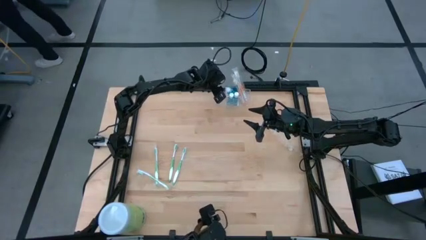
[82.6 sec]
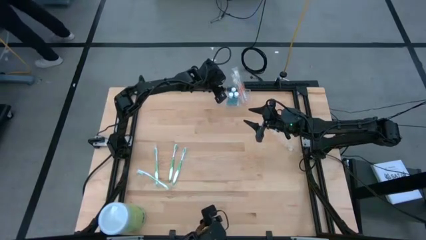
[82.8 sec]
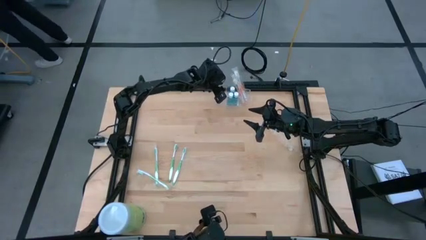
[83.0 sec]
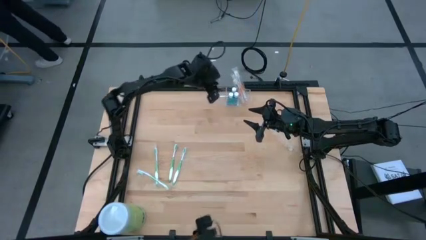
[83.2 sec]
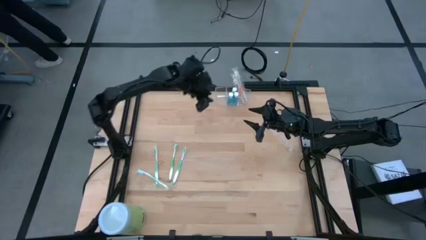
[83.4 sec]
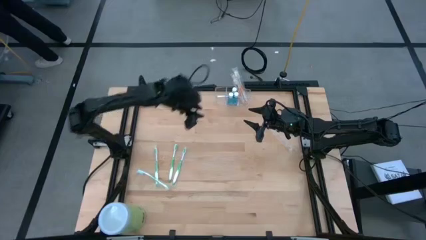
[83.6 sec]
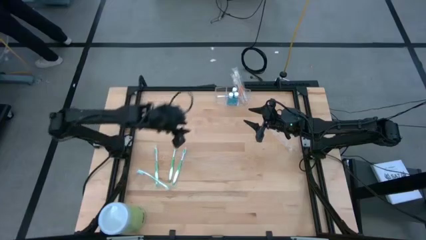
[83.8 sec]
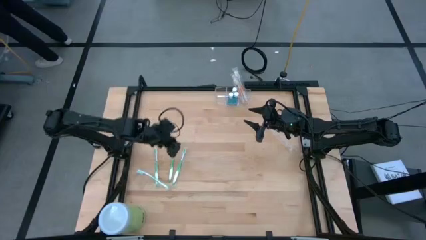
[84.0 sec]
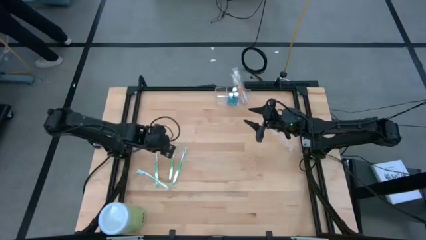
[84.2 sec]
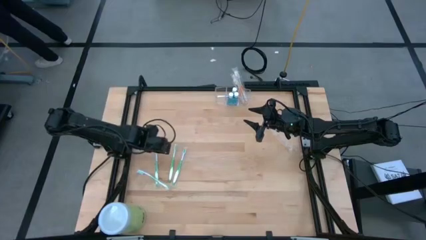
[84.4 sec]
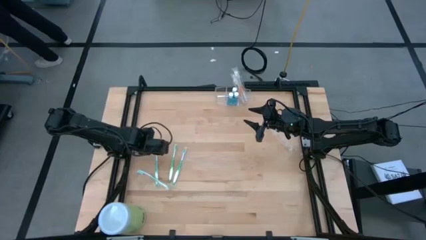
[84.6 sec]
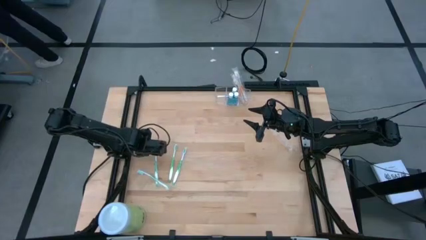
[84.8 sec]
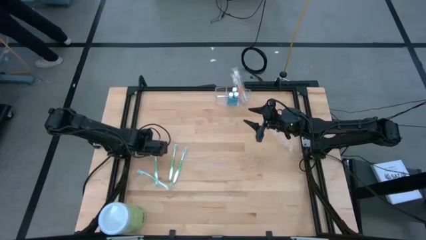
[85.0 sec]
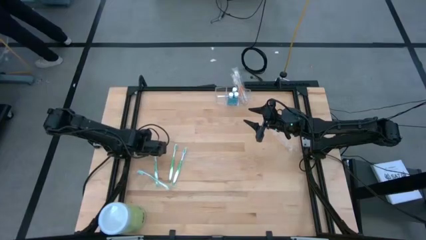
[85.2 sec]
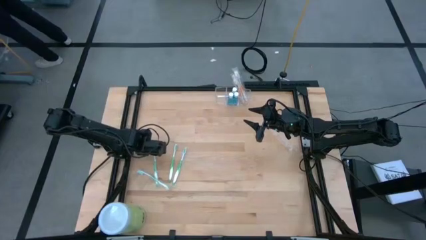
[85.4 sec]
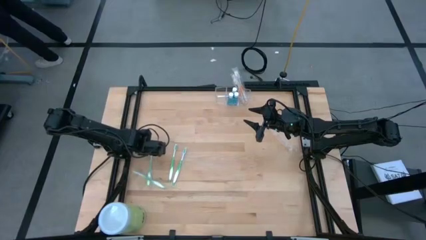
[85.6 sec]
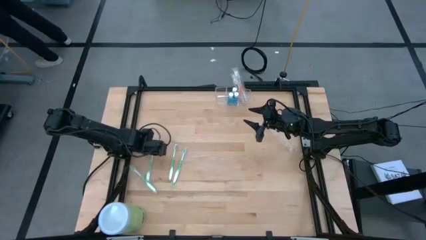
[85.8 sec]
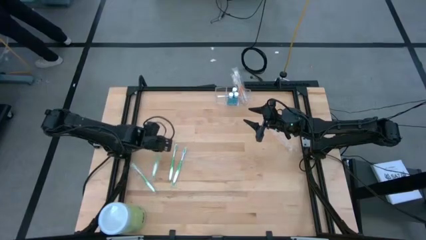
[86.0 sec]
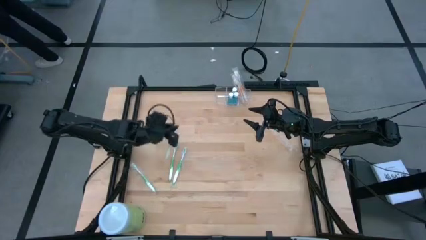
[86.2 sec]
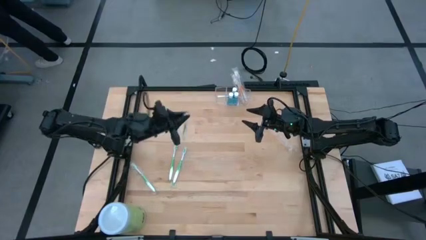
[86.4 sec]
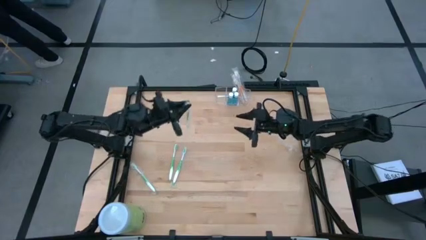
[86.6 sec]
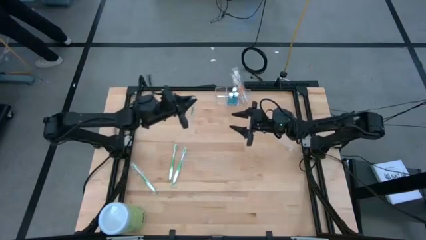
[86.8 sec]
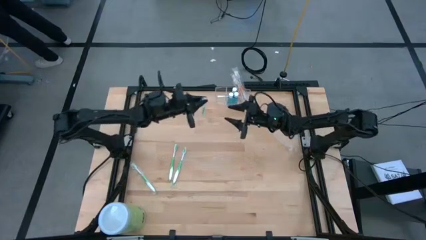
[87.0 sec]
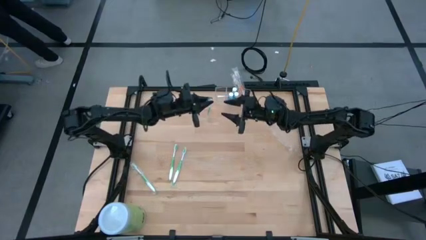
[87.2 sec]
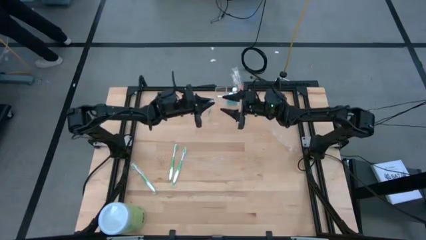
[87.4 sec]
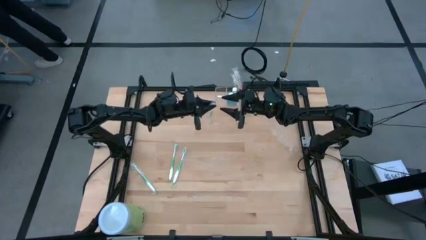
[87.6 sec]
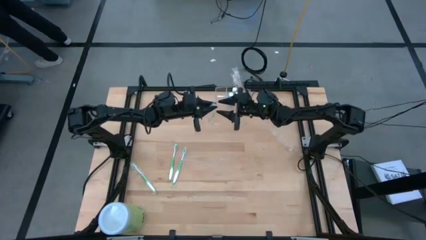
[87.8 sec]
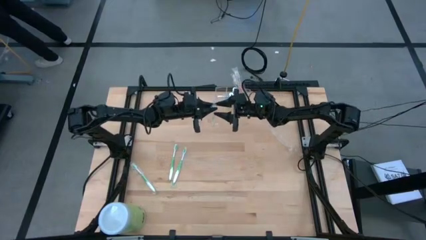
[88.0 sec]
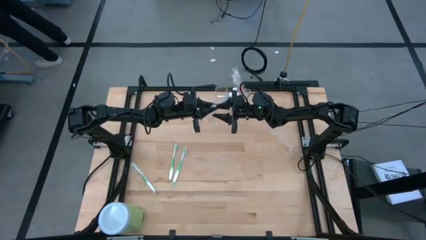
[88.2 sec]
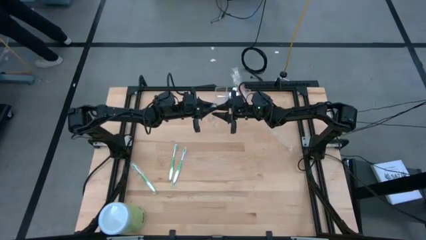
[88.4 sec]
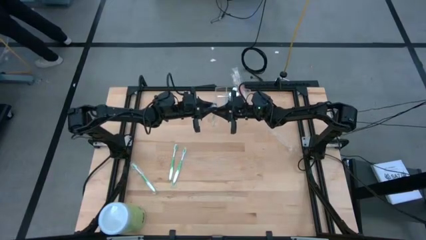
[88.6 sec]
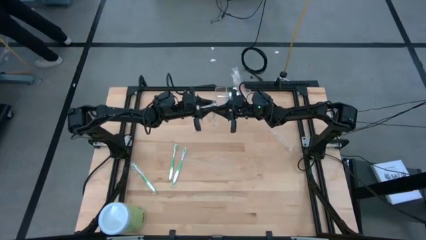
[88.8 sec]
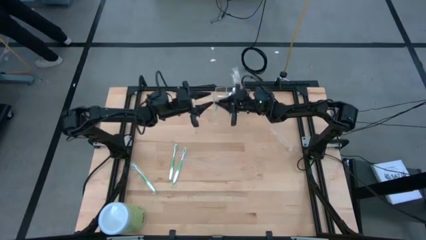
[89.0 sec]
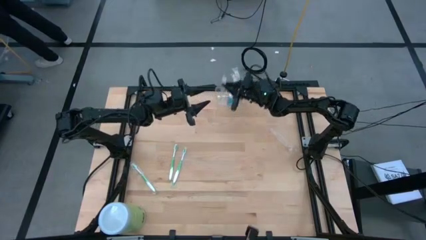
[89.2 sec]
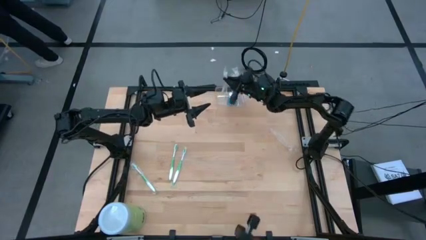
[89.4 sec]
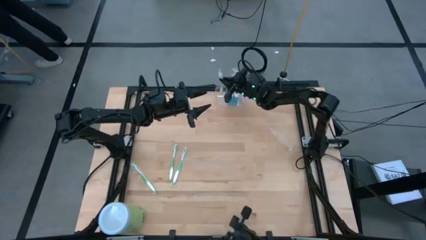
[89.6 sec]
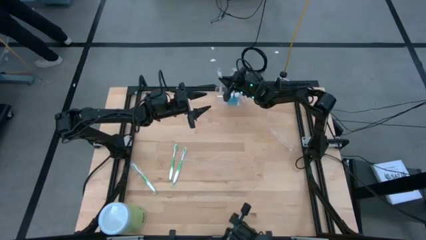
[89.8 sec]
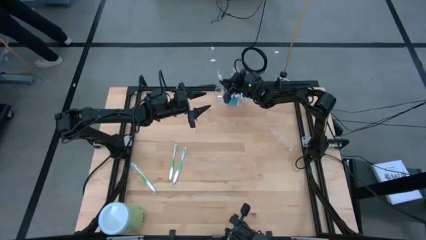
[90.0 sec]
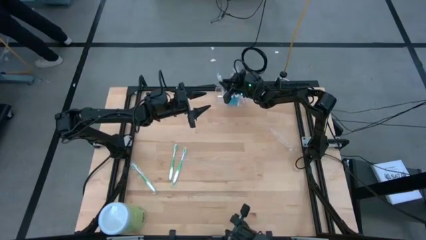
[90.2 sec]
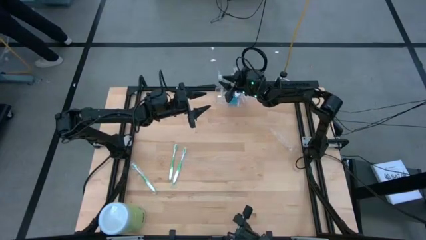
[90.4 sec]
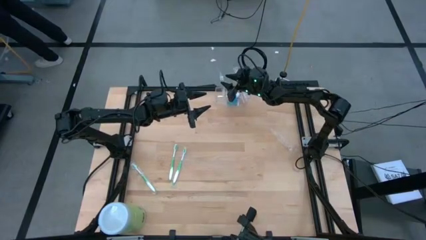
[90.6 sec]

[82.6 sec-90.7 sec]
Task: Pick & Place toothbrushing station
Put the green toothbrush into the transparent organizer

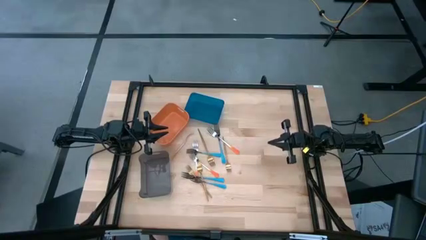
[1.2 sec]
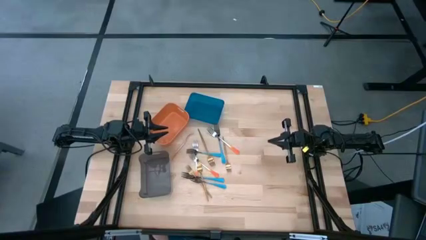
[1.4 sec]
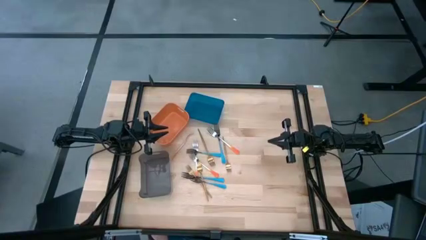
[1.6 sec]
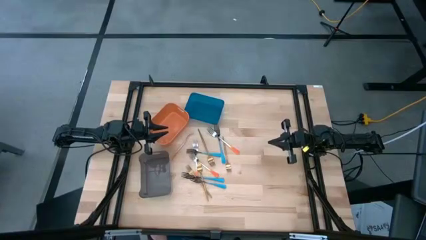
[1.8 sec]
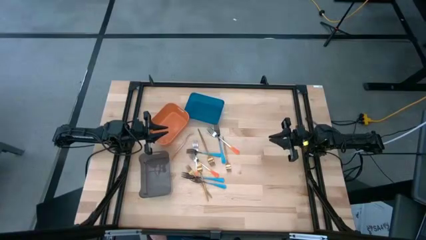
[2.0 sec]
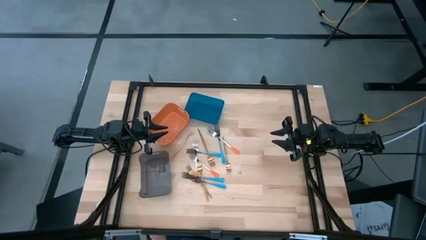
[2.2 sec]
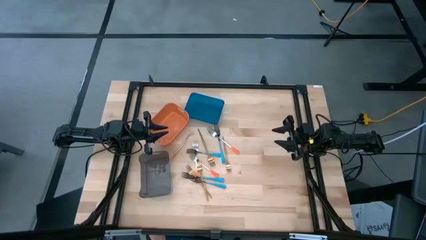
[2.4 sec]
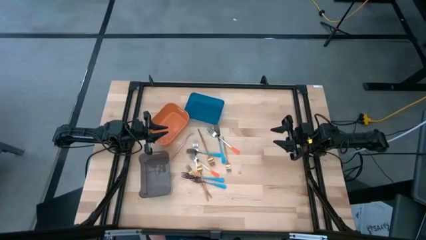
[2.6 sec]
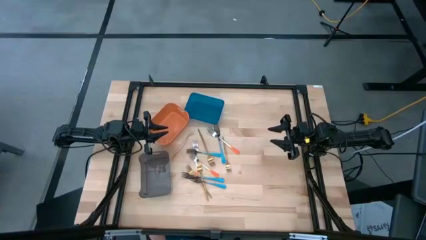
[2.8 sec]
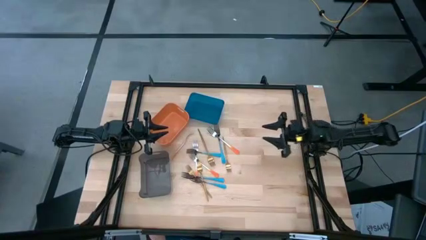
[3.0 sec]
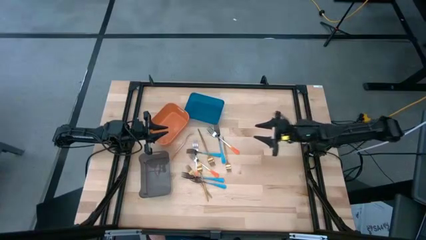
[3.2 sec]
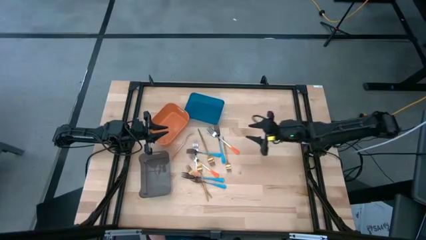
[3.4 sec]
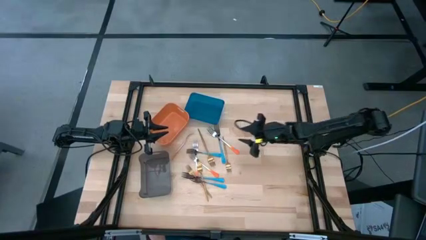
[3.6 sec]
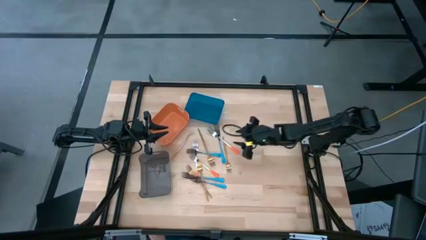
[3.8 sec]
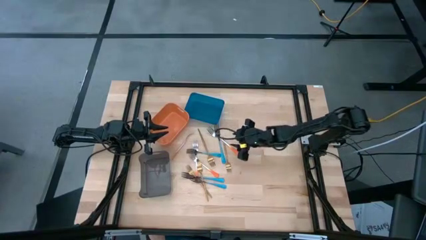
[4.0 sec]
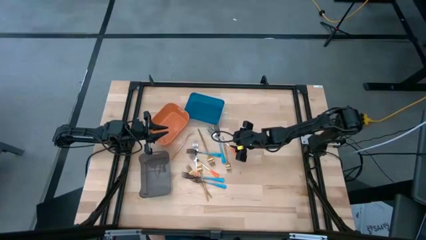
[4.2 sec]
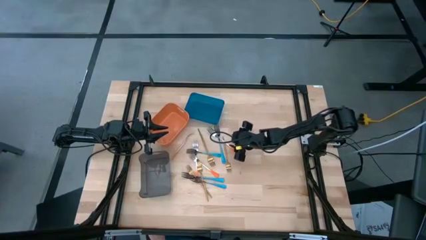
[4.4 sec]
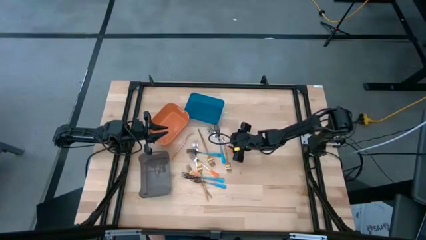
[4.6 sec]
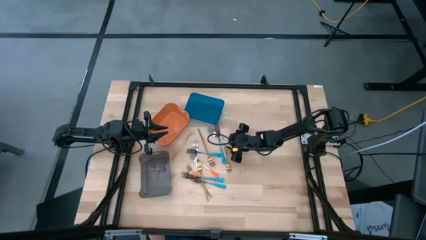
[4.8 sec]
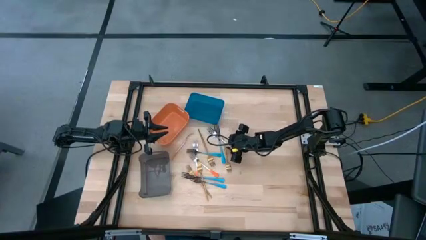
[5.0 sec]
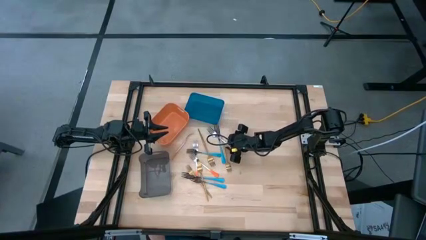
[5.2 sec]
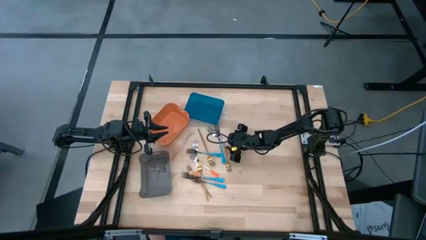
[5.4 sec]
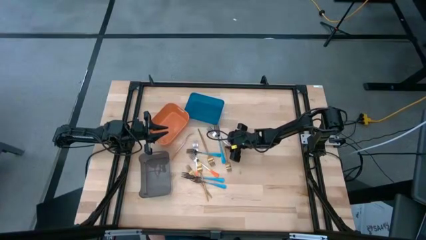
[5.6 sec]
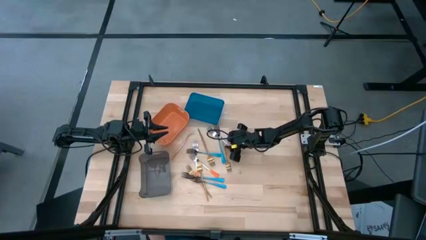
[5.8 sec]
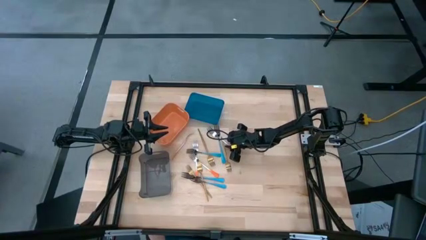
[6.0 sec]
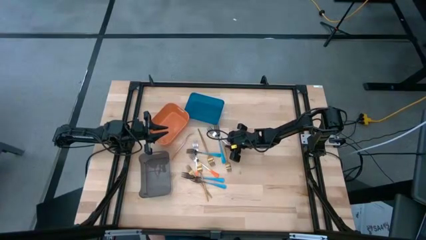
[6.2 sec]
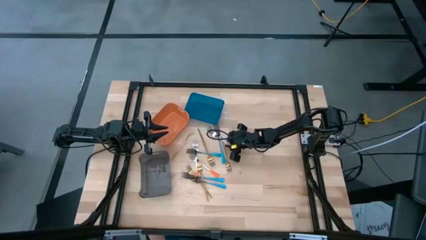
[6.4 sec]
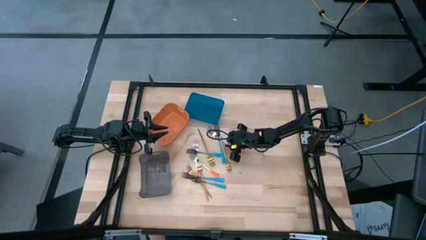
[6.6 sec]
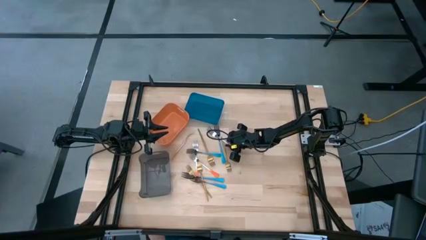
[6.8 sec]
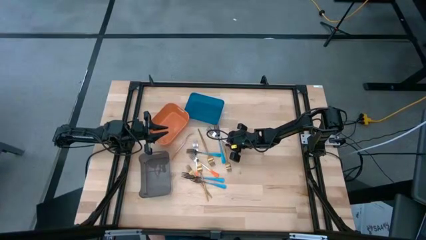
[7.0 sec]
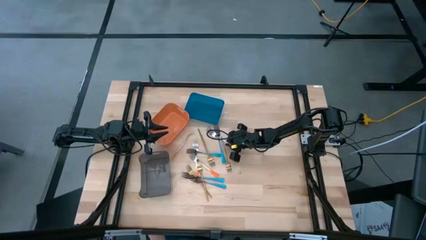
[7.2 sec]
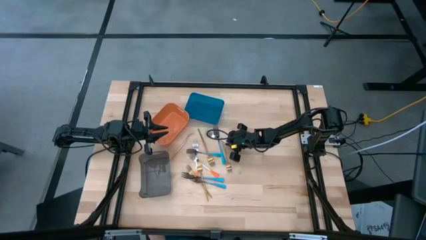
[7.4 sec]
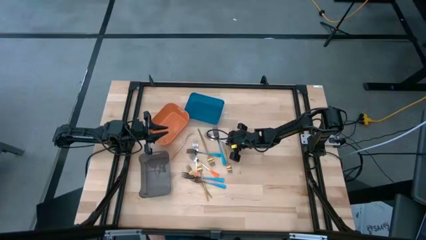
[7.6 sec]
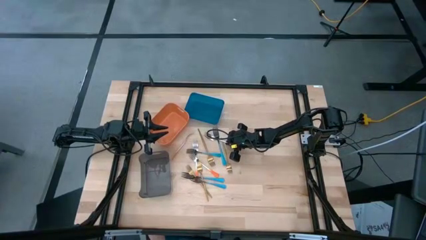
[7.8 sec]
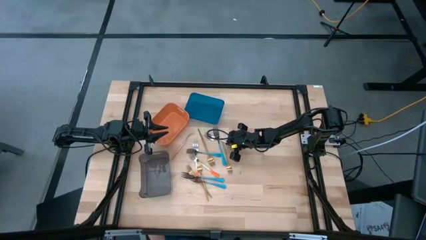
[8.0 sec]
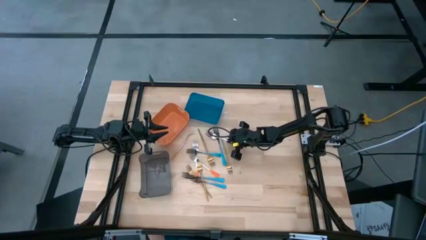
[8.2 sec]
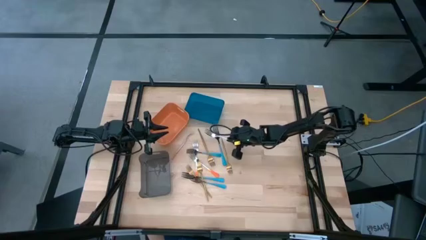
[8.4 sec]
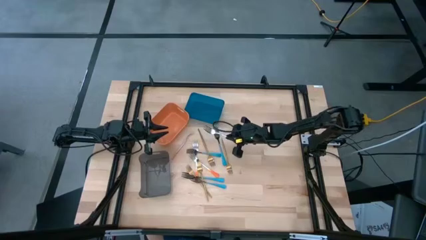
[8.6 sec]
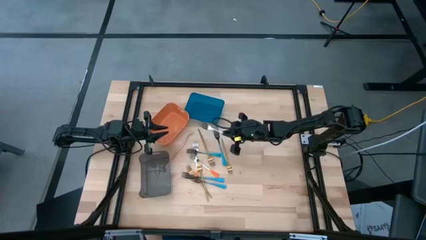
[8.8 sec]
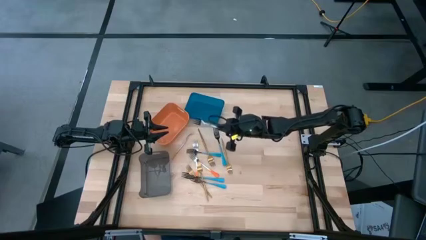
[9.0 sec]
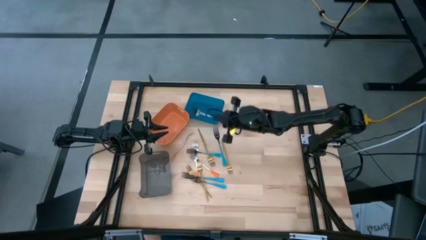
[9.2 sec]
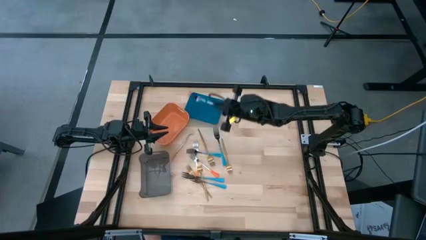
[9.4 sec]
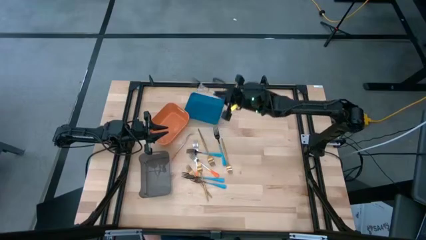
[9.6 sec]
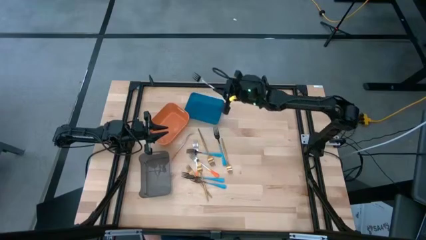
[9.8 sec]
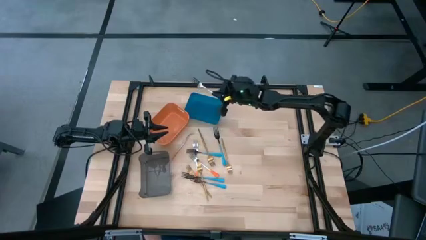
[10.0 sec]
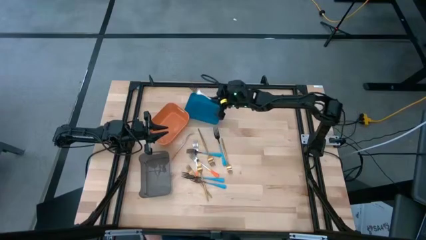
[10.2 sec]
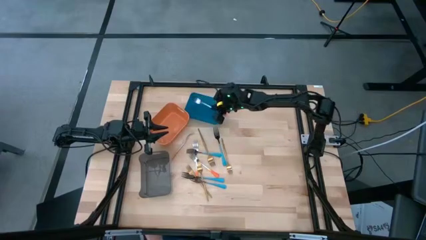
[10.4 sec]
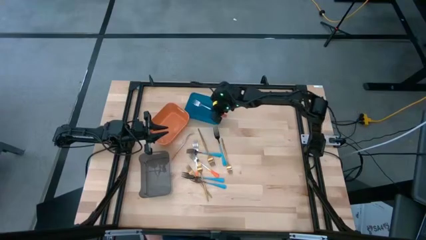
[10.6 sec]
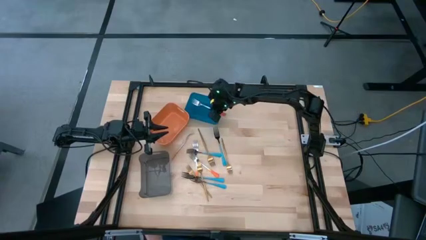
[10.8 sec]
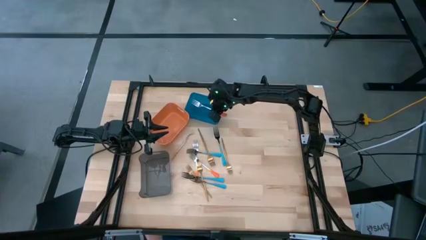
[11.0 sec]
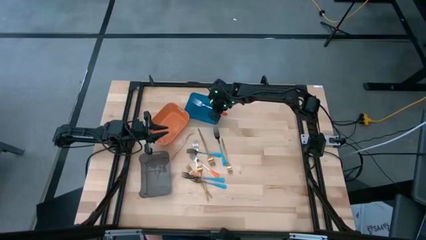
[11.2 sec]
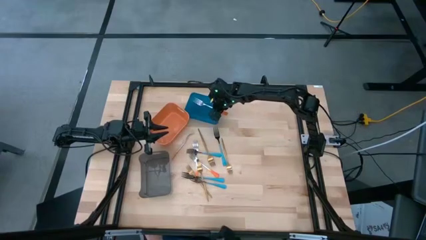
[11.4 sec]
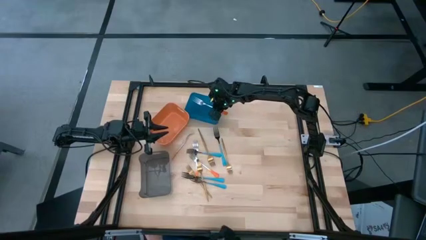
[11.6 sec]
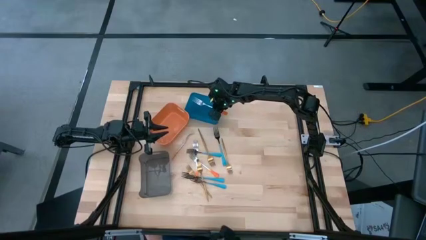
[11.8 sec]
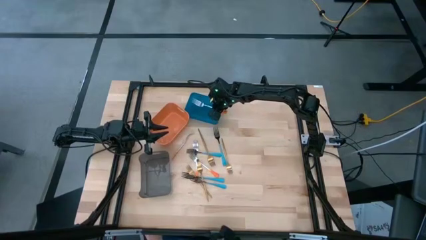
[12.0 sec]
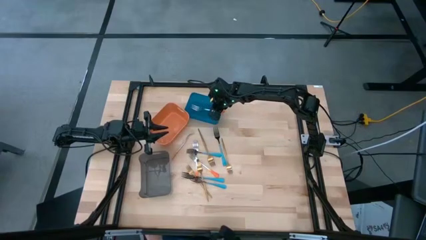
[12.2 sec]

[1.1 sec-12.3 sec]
Task: Sort silverware by color (type)
Put the orange fork into the blue bin
